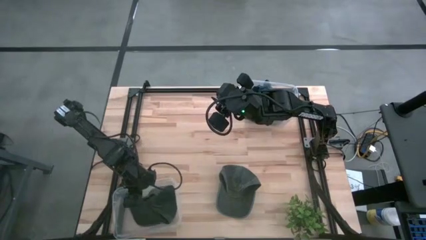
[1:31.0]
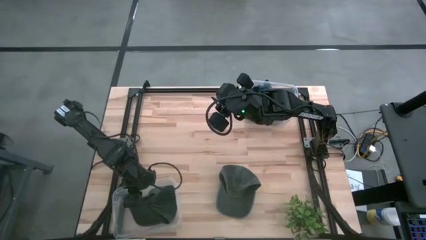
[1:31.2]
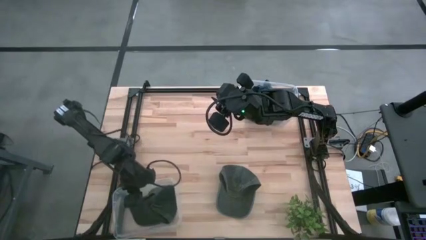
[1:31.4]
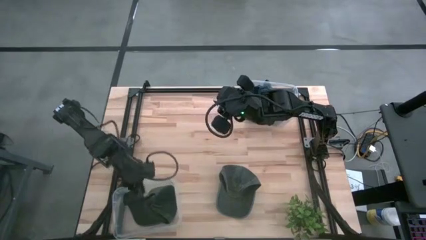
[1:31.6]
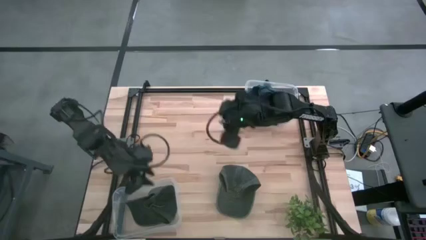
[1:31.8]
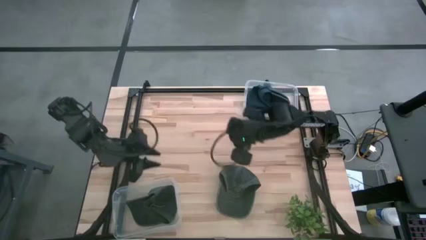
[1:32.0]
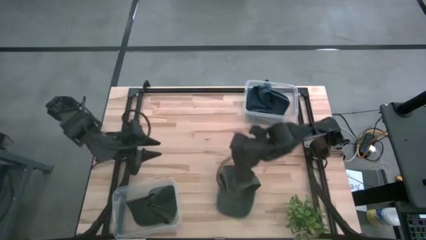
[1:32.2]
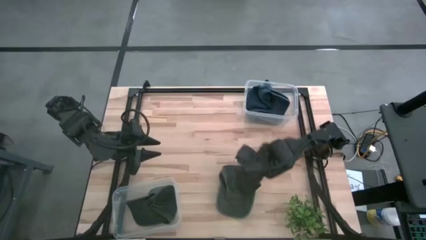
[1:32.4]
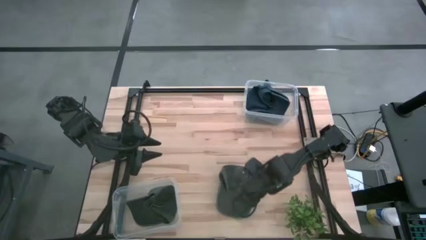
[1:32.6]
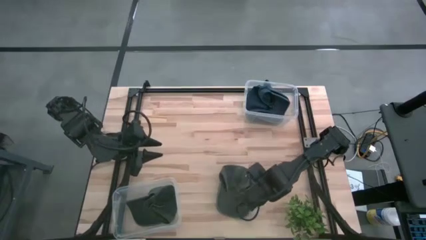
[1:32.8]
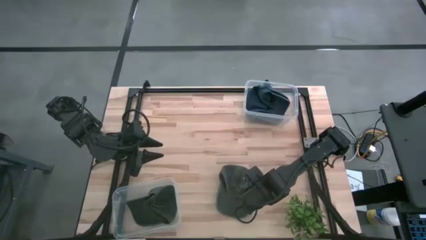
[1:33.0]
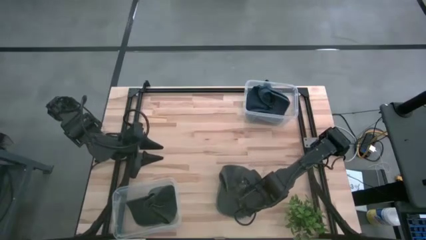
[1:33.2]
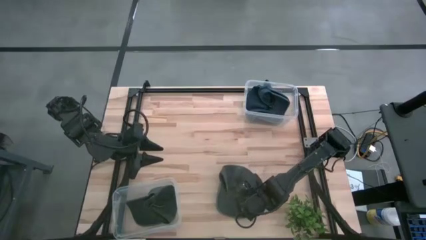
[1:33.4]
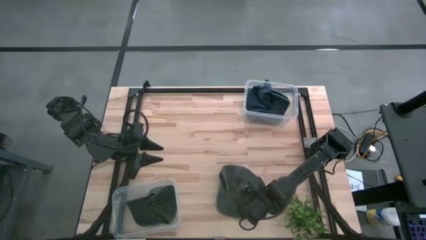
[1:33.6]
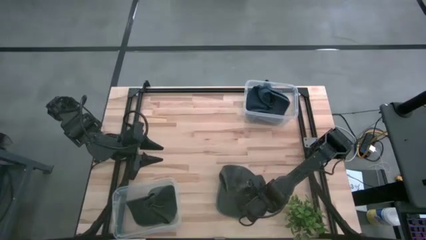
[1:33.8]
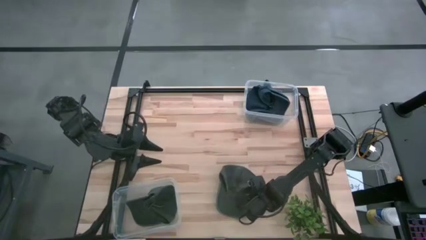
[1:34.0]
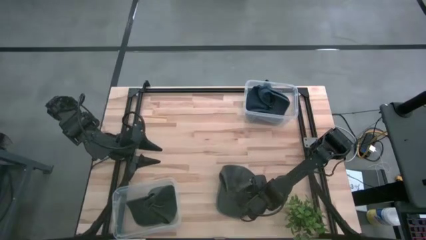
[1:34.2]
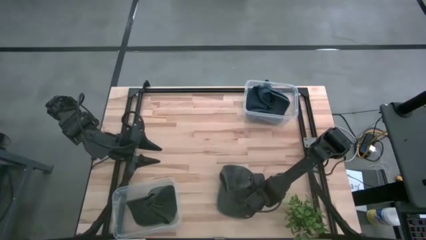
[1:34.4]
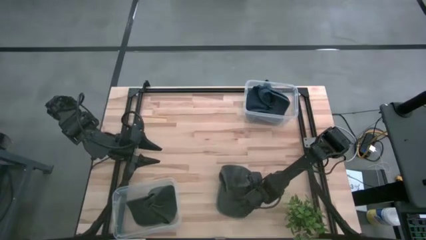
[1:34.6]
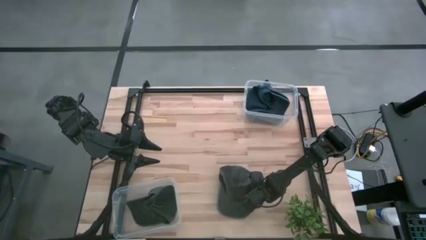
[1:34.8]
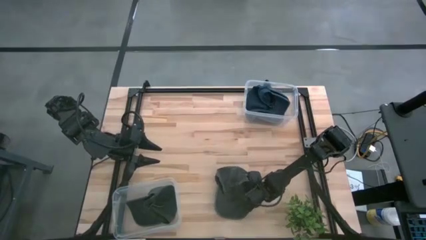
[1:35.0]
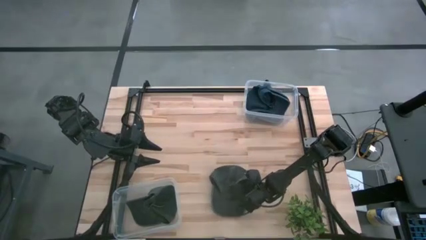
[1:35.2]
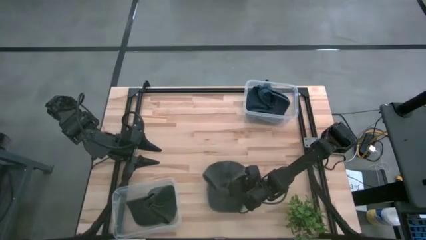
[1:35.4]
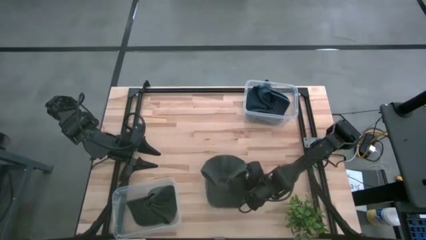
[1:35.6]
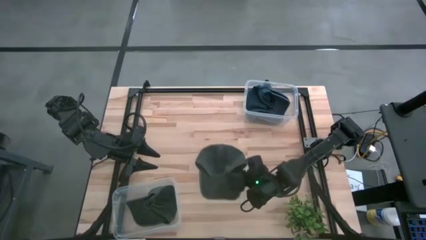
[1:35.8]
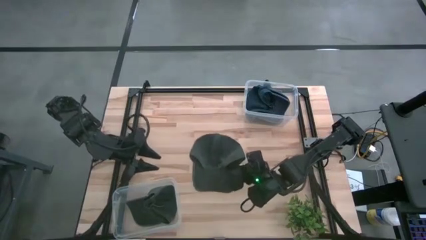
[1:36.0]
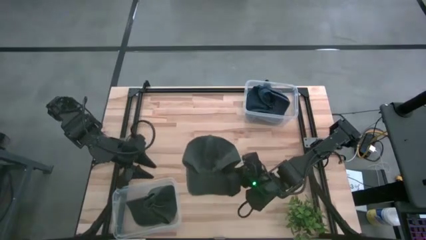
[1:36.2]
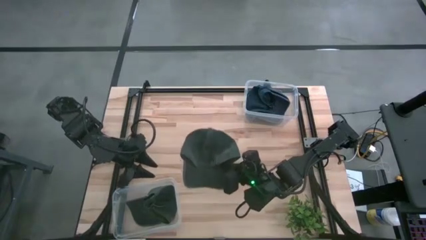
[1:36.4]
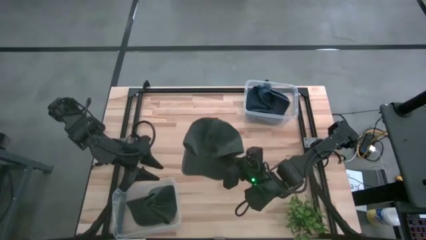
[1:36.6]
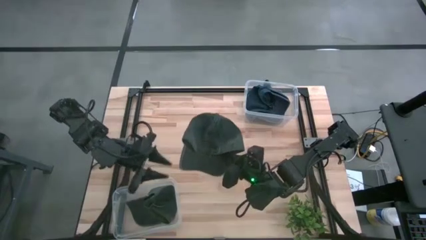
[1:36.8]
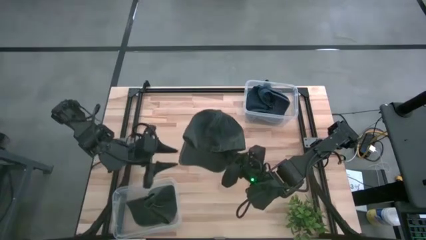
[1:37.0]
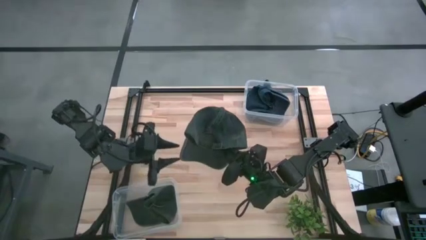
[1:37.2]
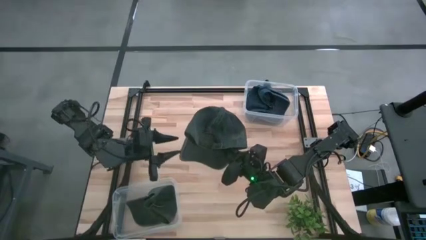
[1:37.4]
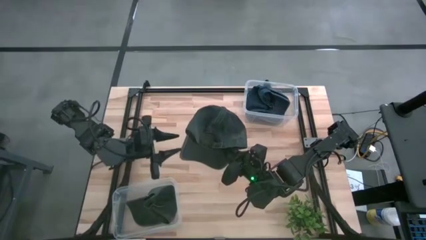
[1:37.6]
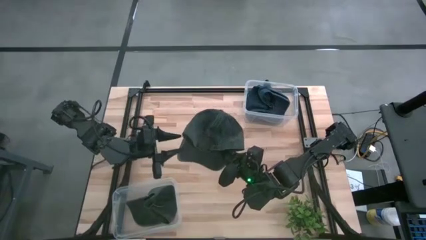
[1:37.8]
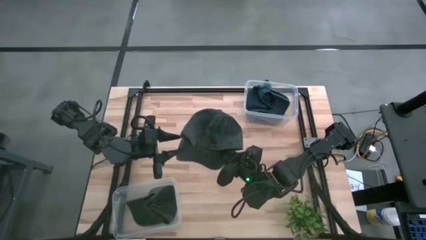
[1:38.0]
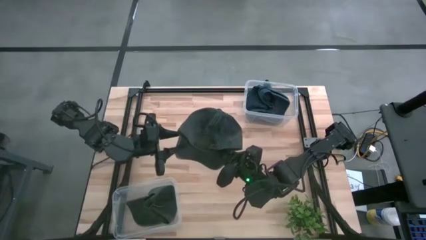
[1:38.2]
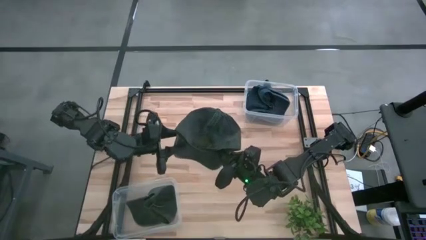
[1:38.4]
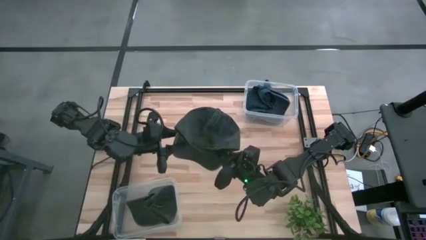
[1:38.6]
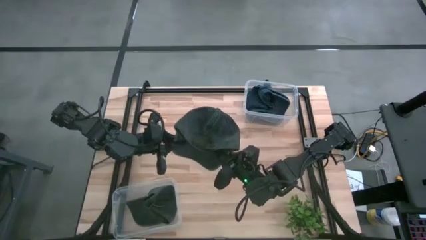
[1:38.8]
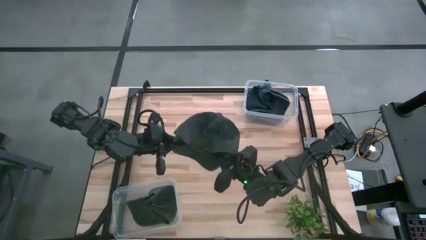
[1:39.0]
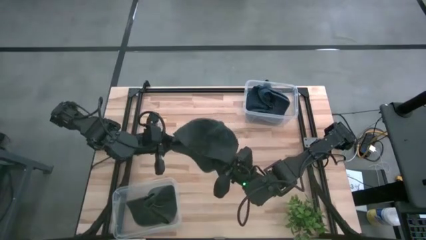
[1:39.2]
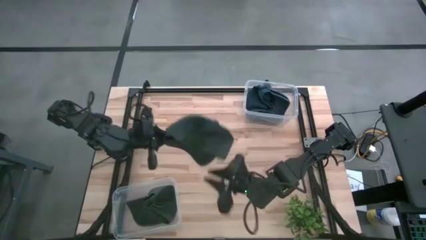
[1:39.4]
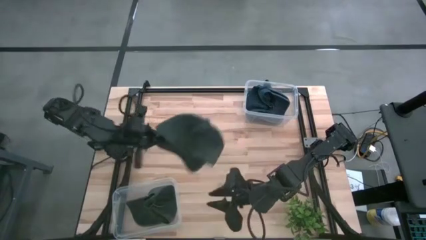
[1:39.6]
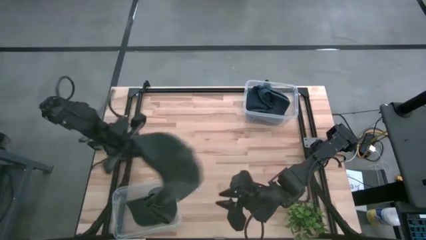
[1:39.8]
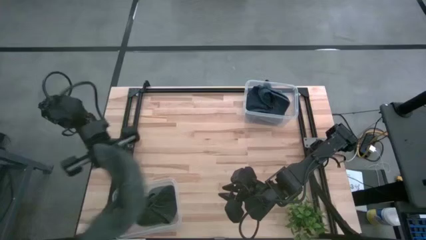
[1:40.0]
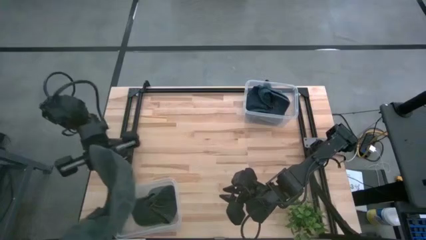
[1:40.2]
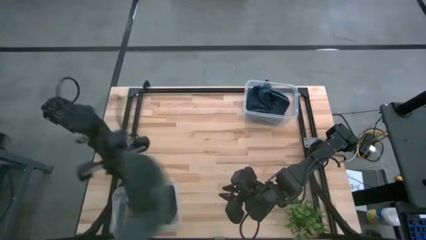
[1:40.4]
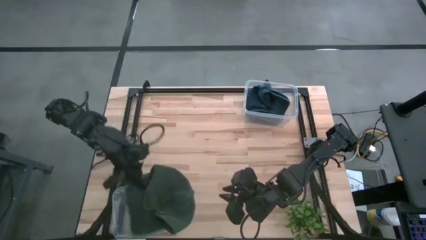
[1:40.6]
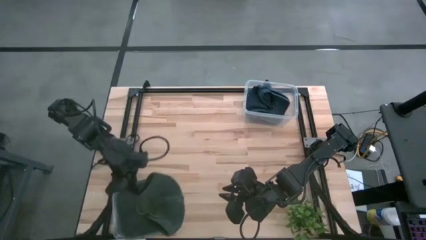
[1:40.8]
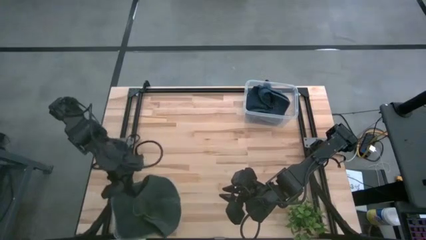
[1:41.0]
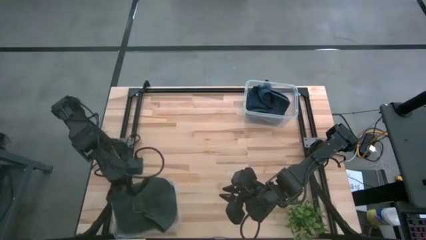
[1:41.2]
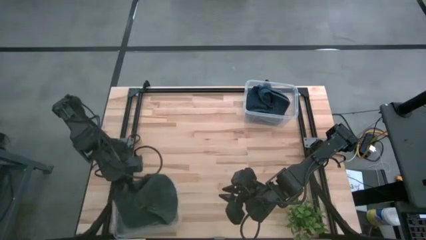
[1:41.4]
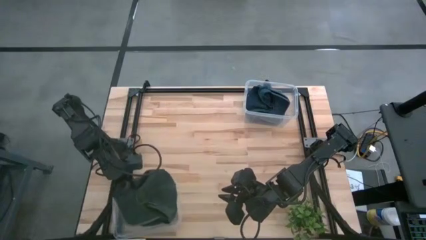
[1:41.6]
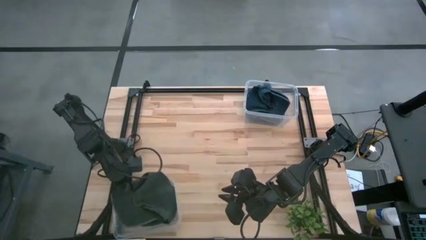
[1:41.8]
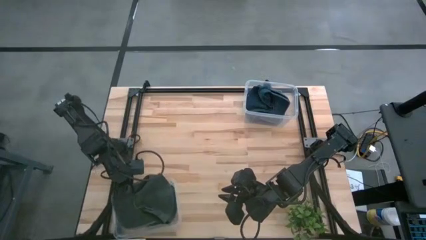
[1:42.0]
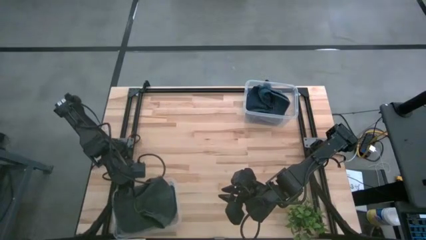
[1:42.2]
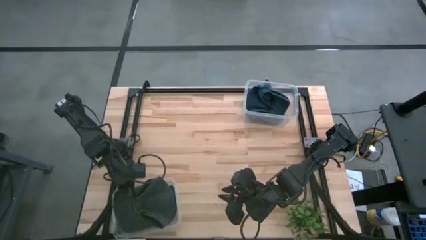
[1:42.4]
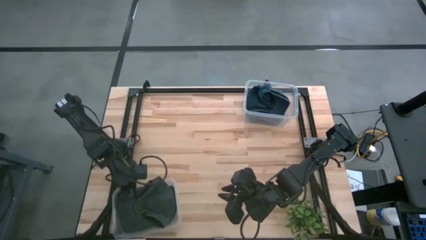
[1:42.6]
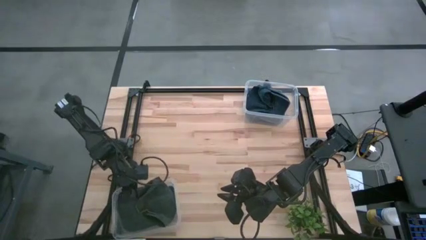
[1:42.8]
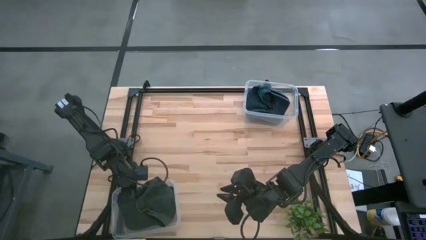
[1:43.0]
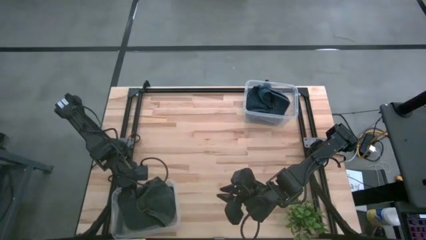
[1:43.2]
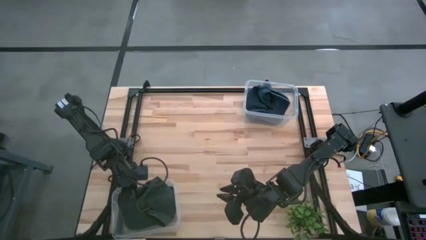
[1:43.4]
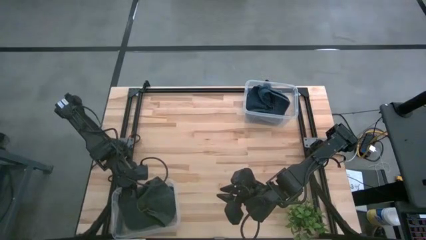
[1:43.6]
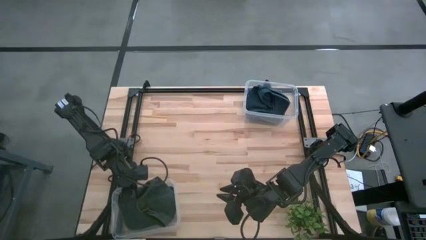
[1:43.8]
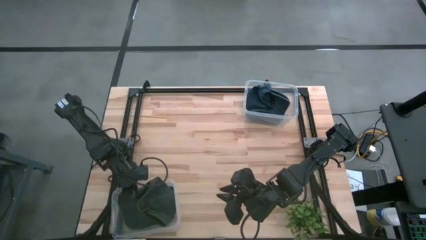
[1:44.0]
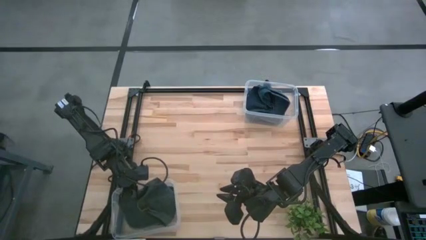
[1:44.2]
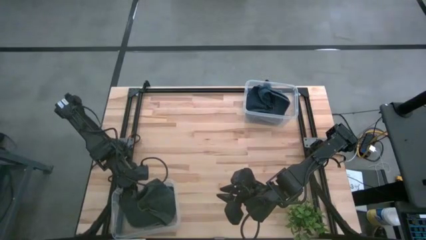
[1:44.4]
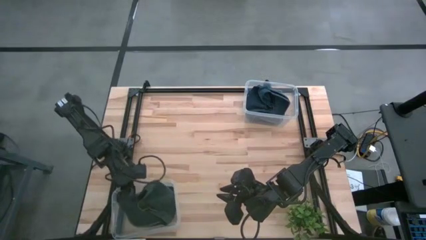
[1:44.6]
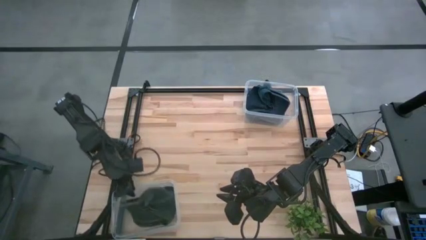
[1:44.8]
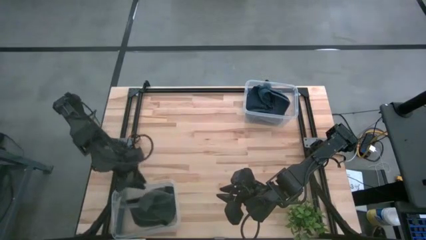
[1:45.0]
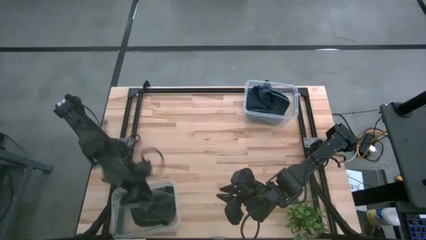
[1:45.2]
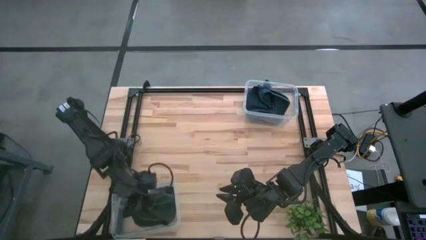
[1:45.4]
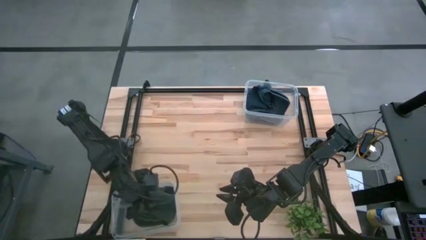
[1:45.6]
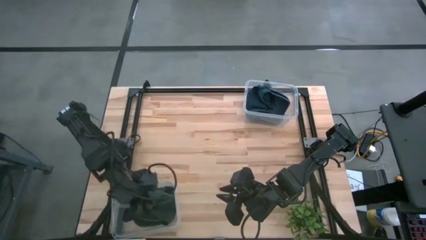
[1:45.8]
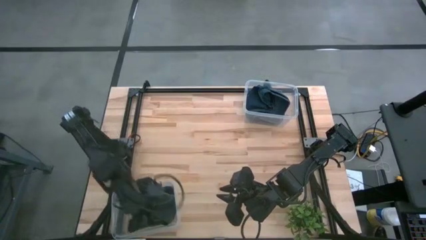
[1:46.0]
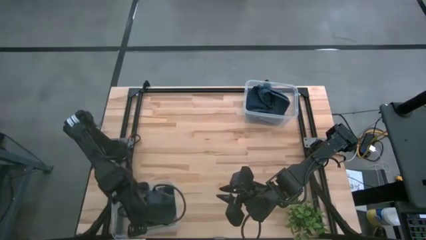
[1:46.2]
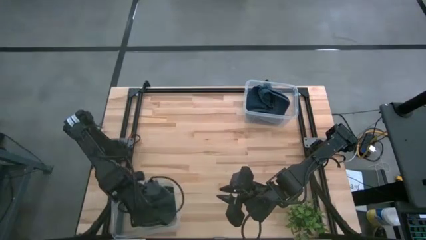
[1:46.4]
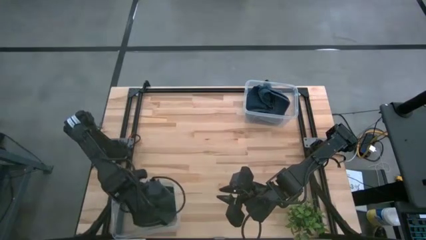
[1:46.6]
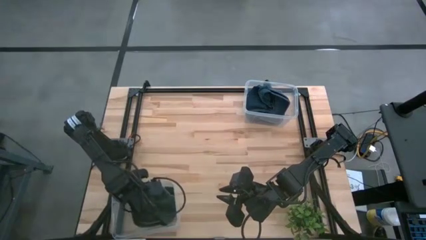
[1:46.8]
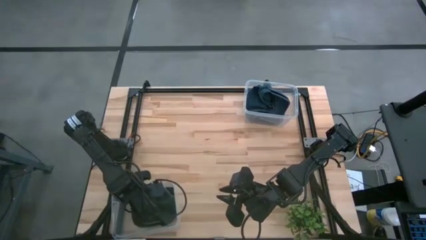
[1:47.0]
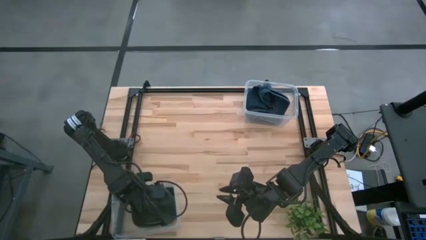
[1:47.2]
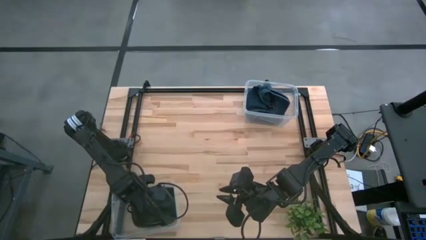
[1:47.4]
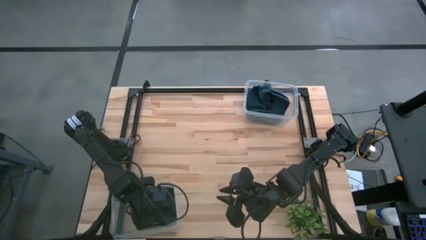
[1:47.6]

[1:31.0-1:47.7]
Task: Pick & Place hat
Put the gray cap into the bottom transparent bin
